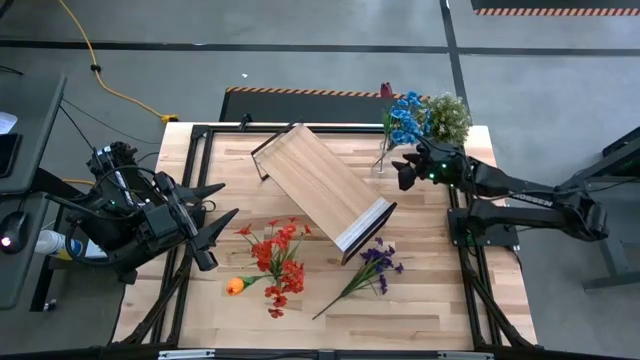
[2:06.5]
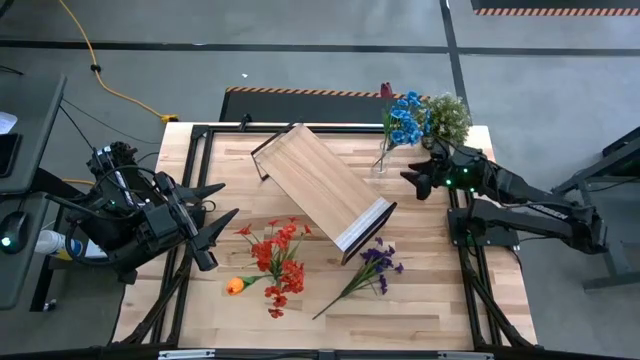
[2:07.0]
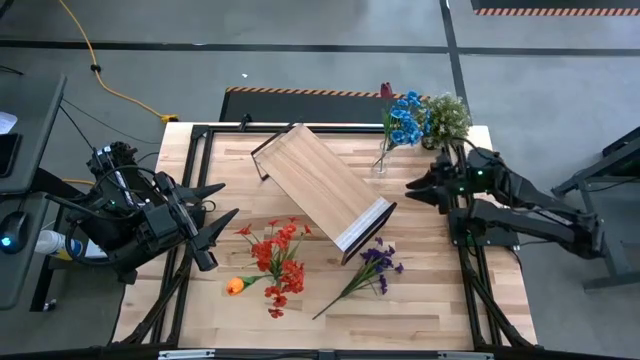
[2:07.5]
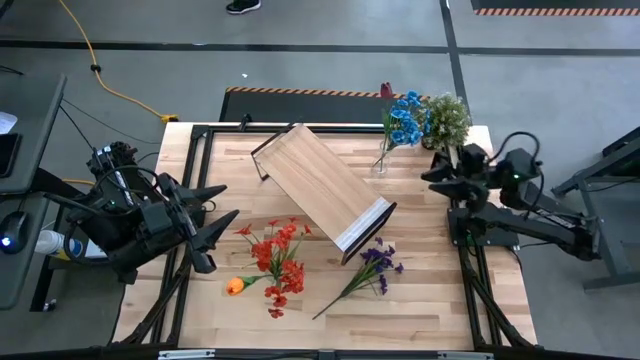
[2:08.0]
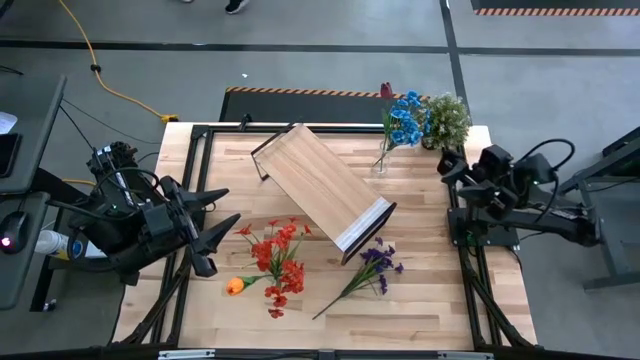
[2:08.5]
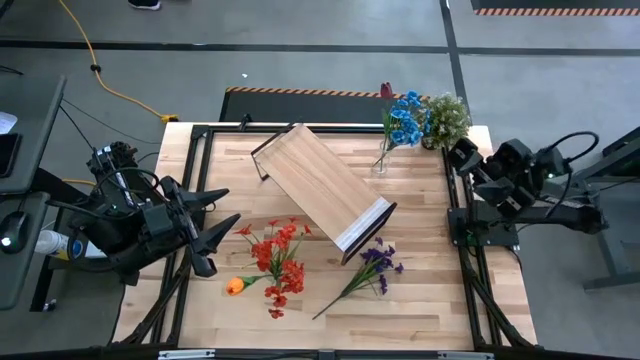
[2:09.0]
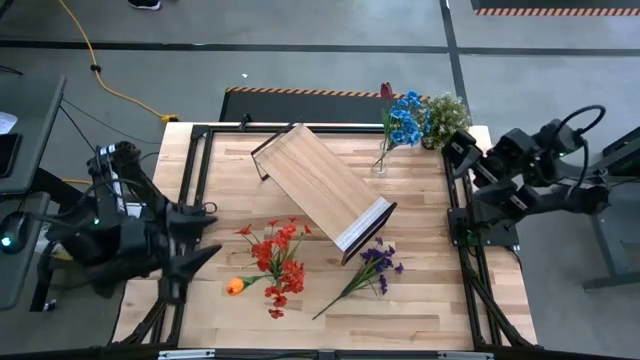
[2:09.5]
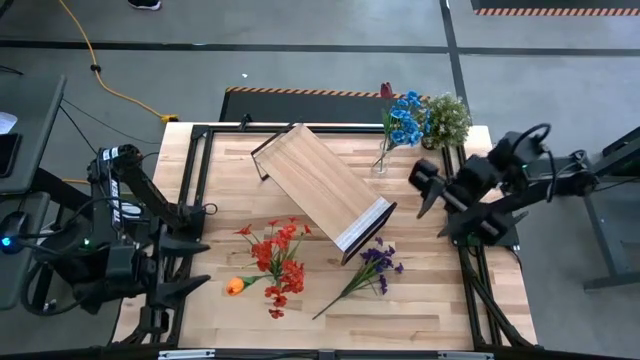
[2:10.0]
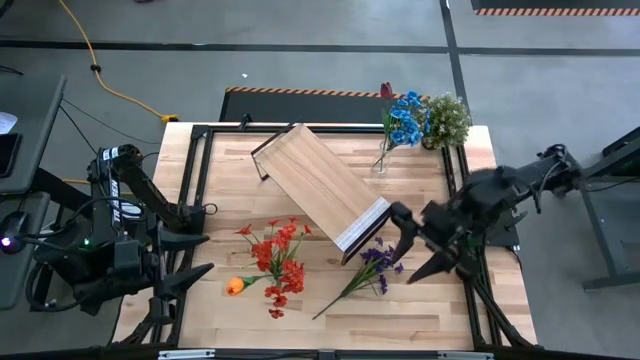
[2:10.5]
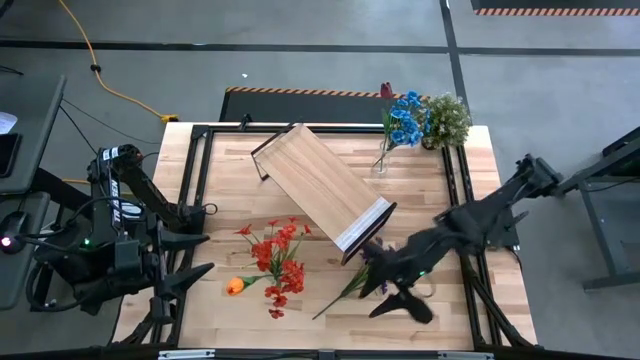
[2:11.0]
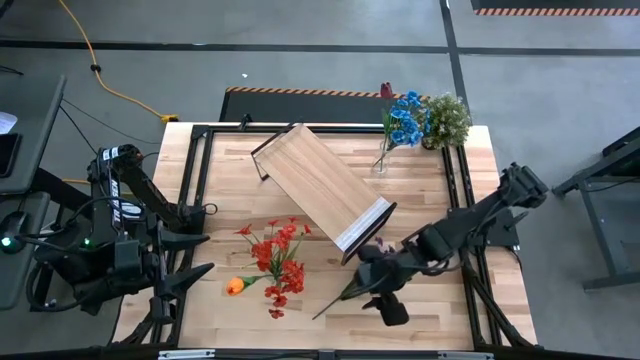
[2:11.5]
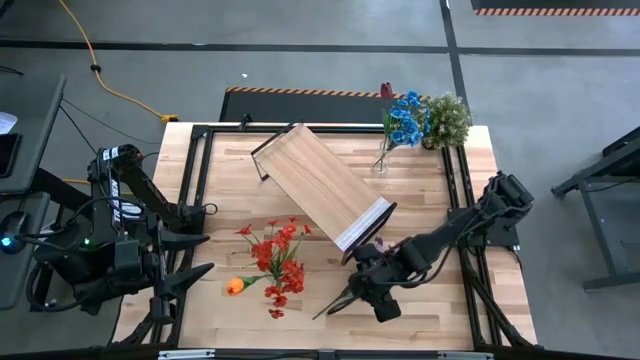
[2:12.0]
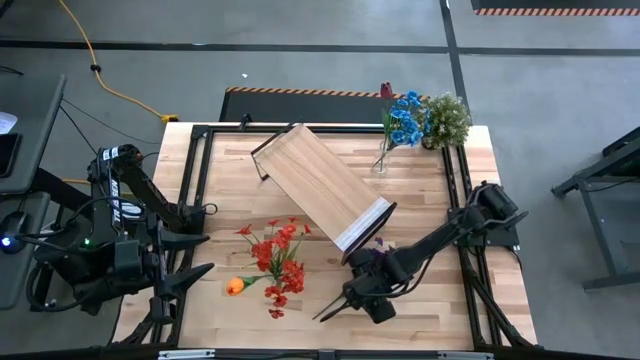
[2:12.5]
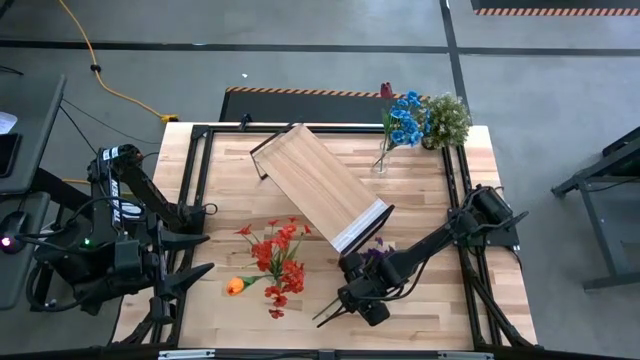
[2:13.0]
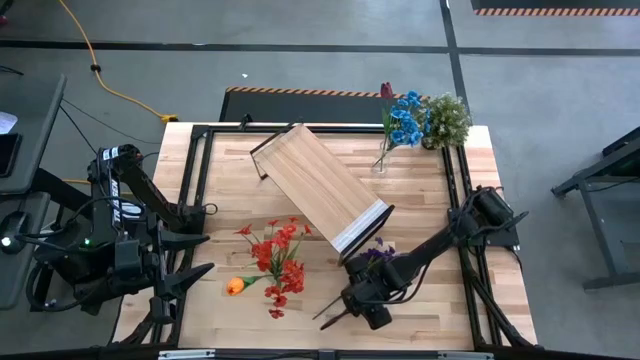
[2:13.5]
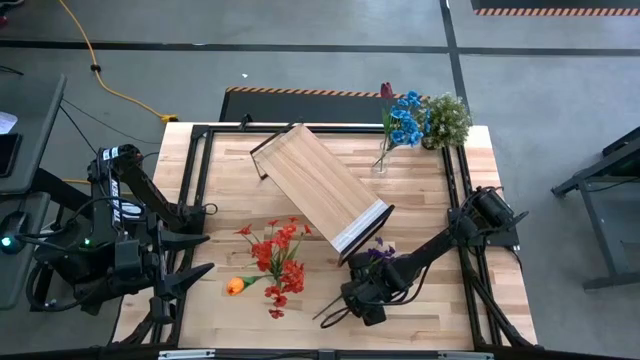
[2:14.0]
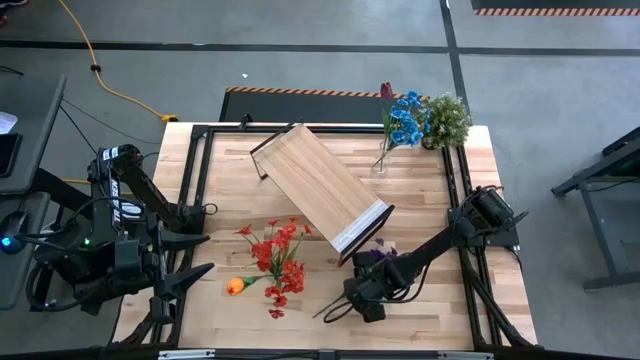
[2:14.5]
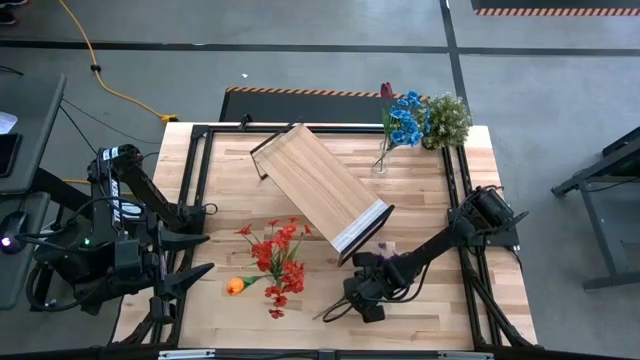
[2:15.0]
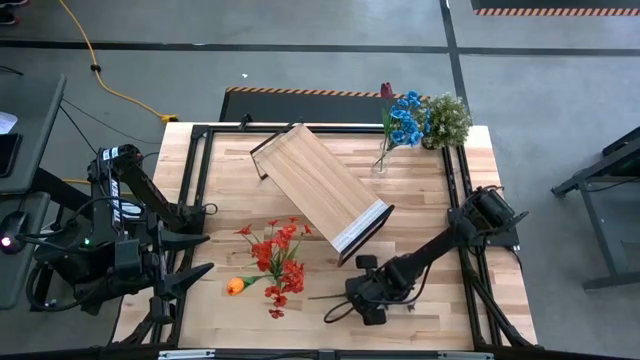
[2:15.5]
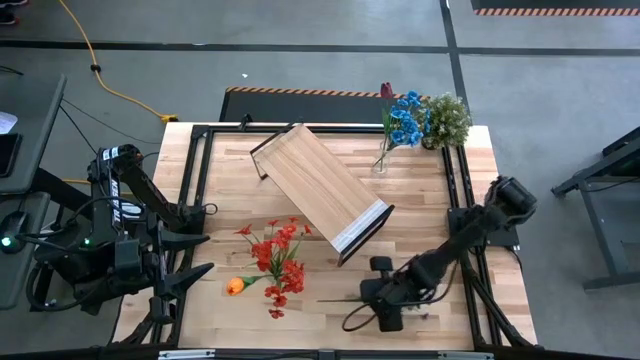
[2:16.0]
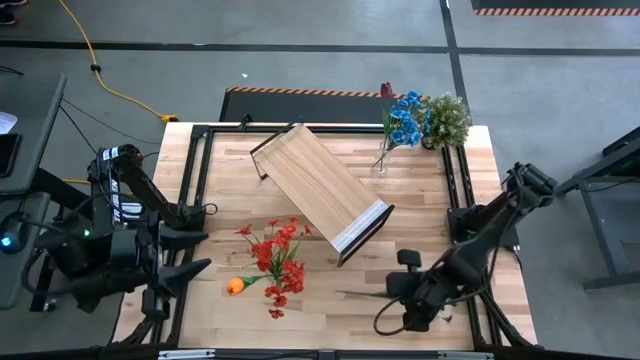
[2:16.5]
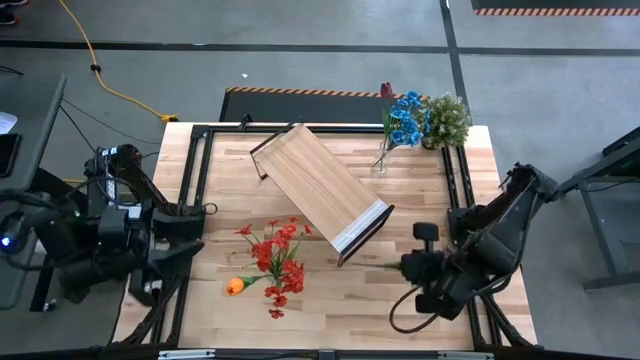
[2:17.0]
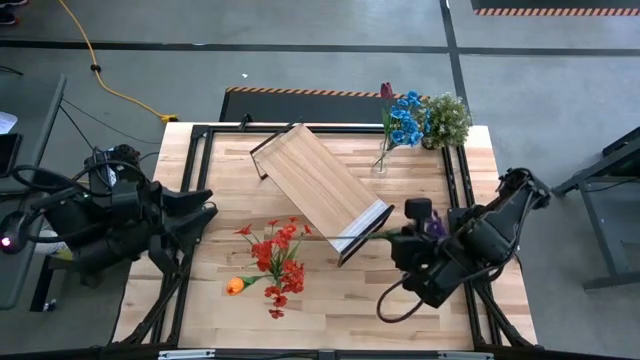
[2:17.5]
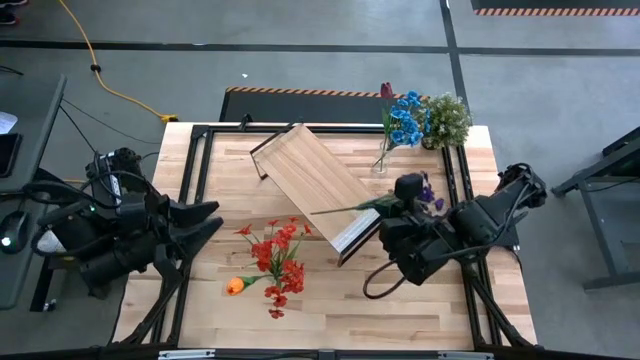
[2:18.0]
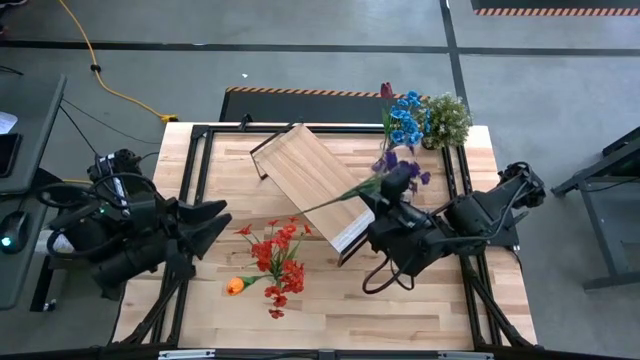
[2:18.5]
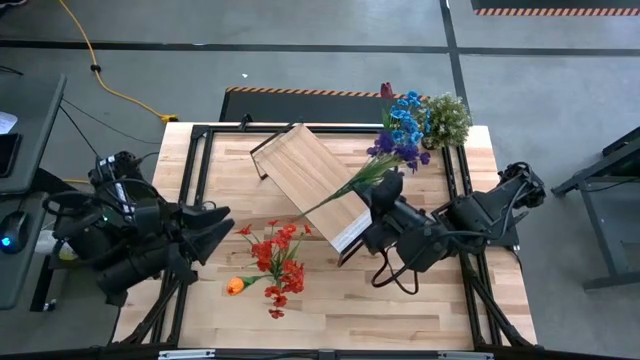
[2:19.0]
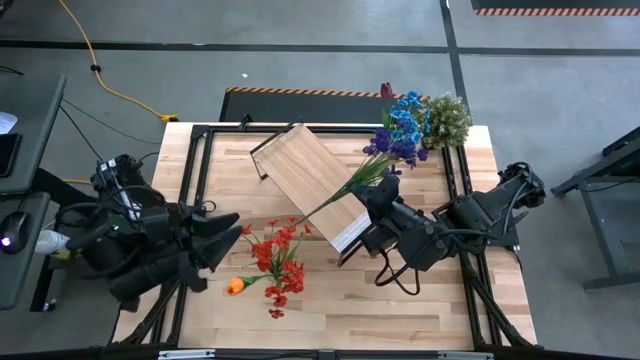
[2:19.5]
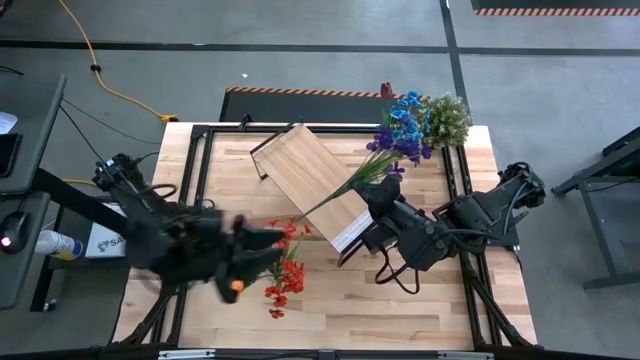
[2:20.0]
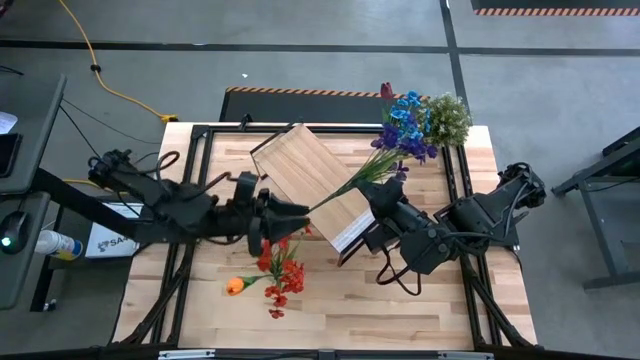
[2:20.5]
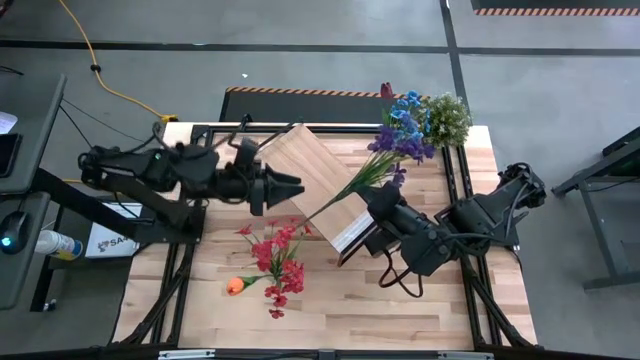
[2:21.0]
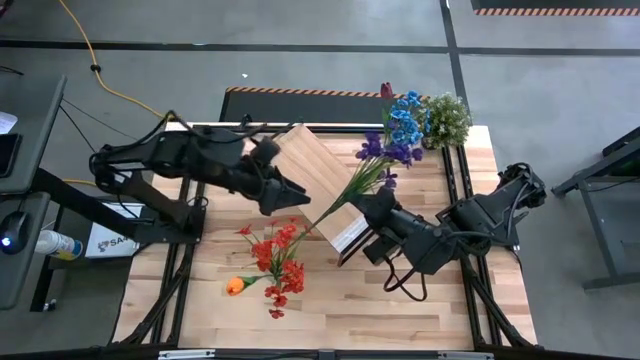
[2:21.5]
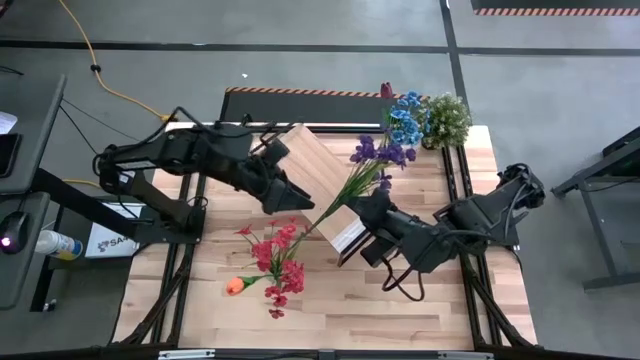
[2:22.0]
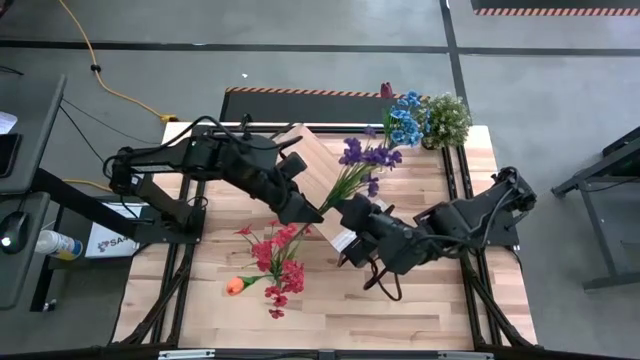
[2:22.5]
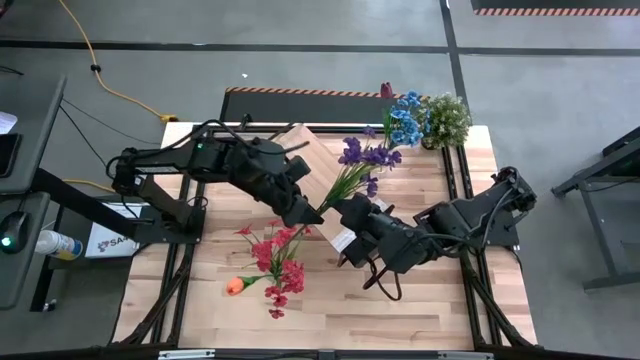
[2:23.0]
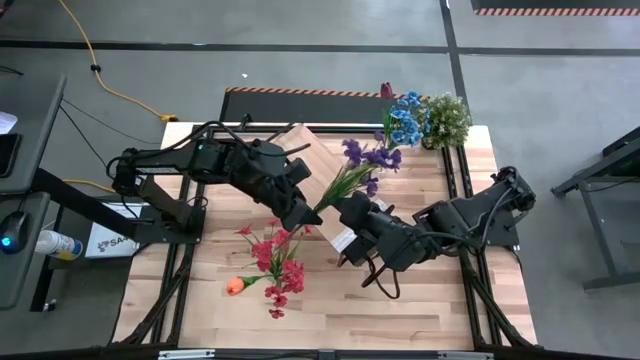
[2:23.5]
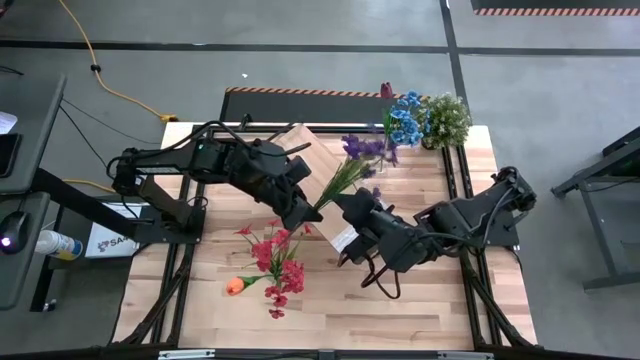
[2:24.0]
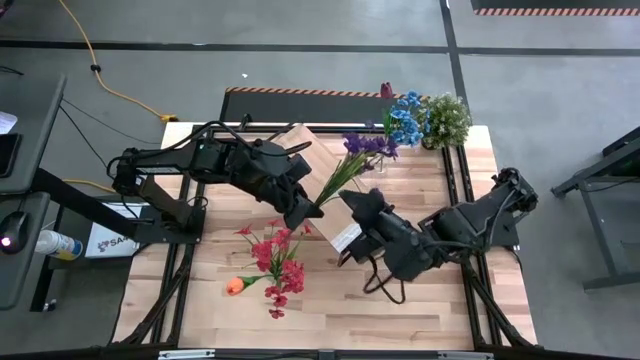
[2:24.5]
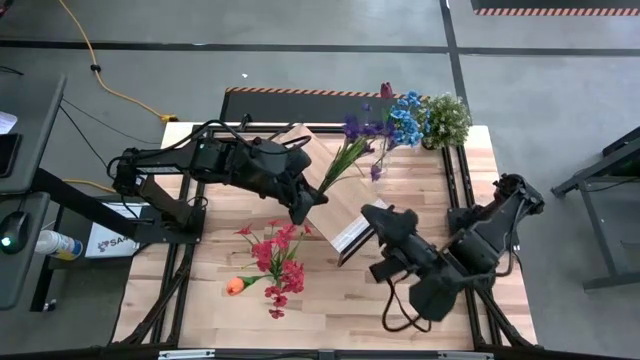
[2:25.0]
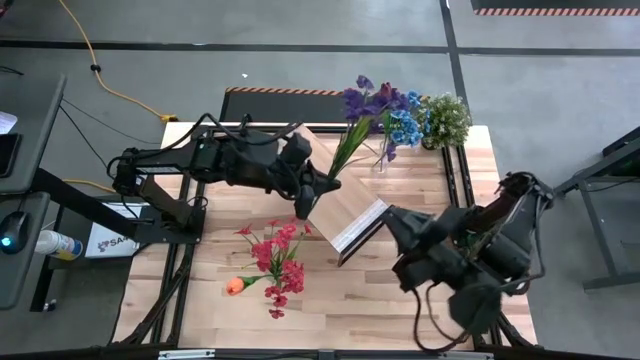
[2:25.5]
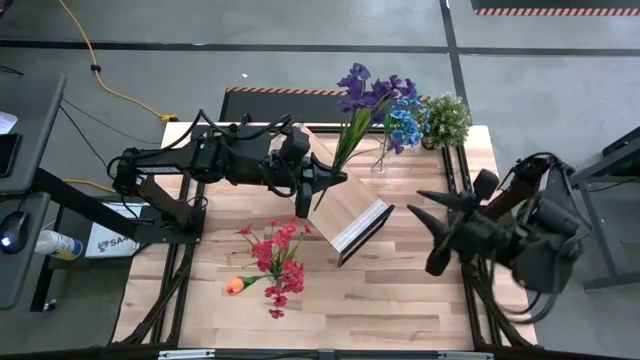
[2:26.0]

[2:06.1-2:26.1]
Task: Pick and place flowers into a vace then onto a shelf
Put the violet flowers into the top transparent vase

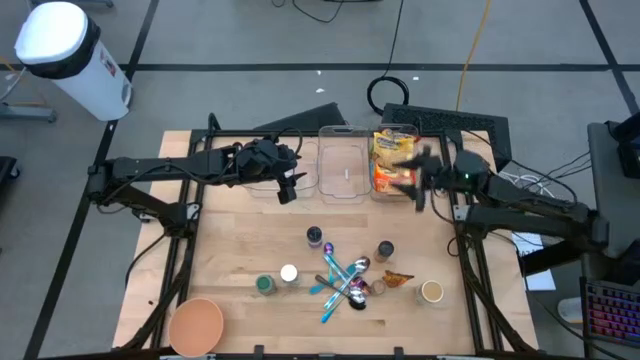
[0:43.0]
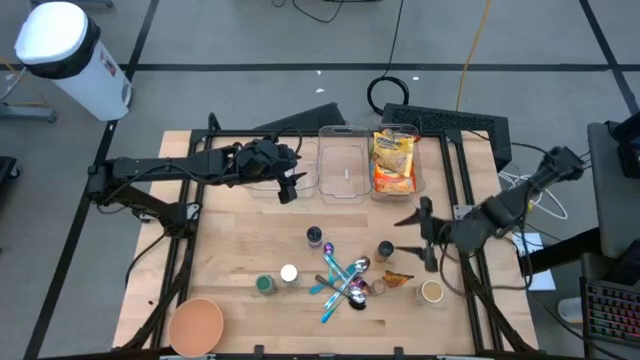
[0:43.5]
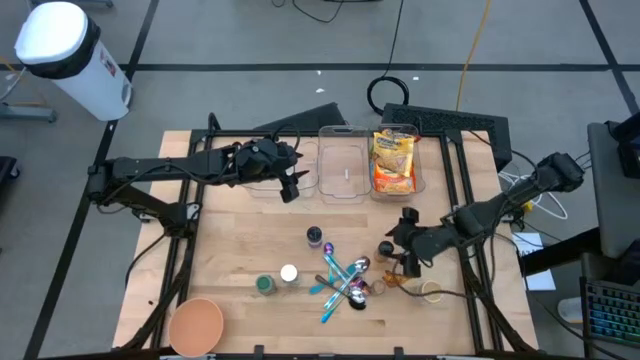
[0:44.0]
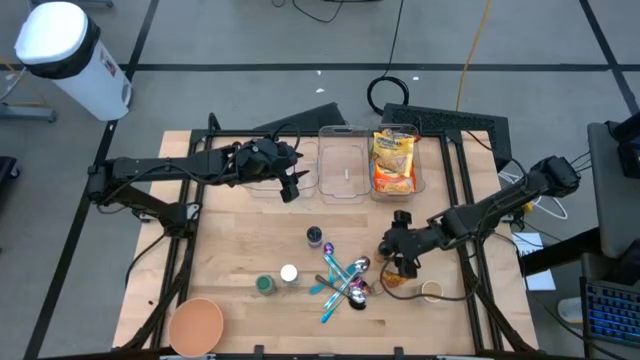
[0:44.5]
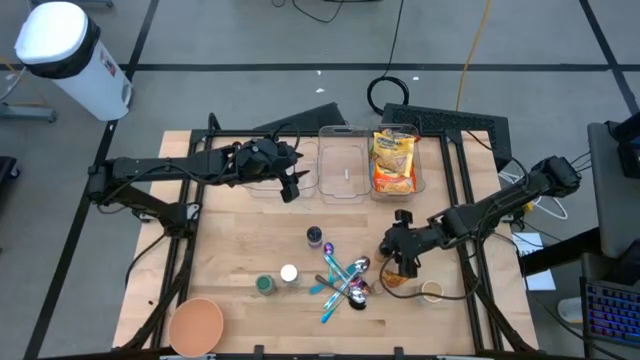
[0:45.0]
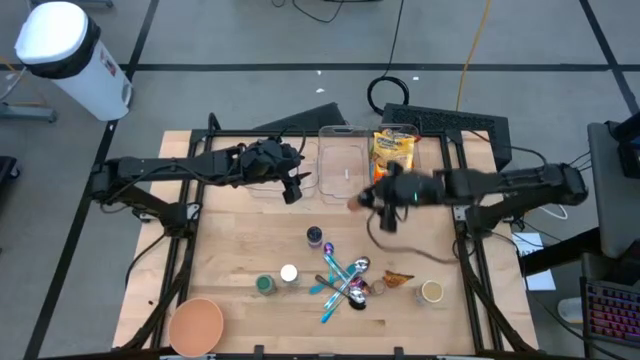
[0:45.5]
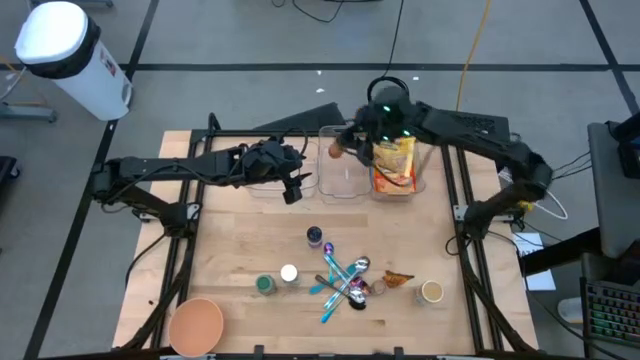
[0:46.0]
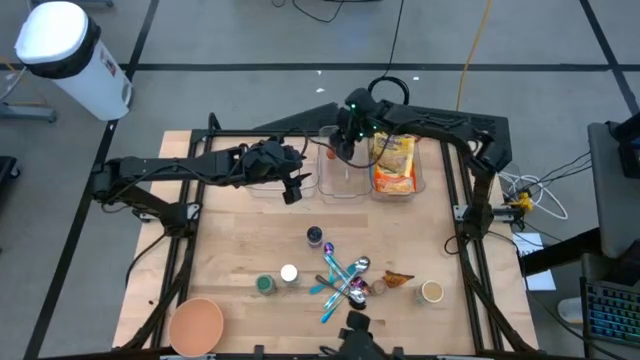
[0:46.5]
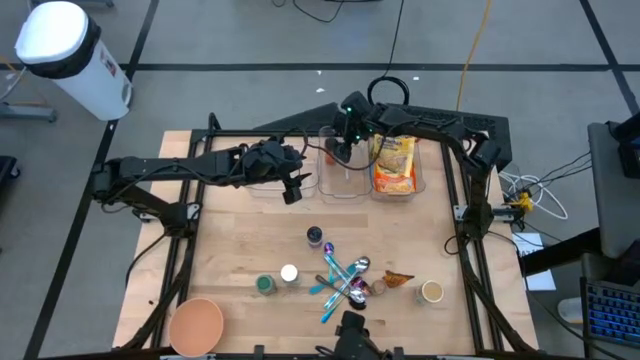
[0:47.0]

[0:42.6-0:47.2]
Task: Pick & Place Food Item
Put the orange seasoning bottle into the middle transparent bin
